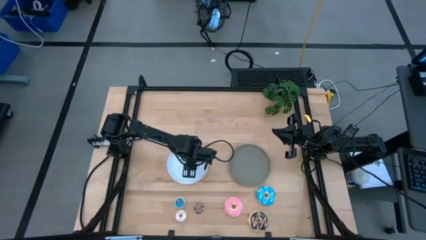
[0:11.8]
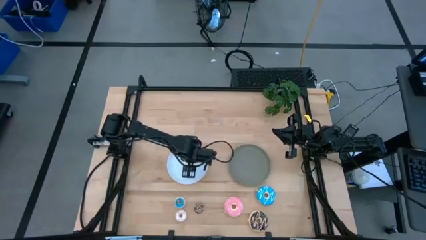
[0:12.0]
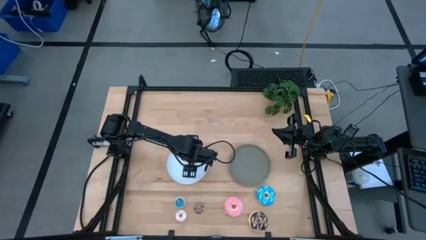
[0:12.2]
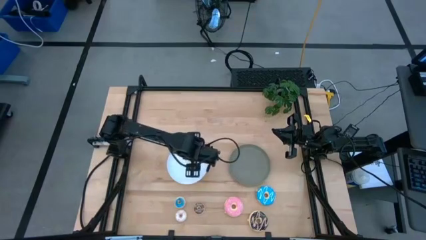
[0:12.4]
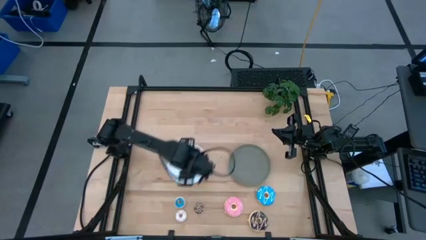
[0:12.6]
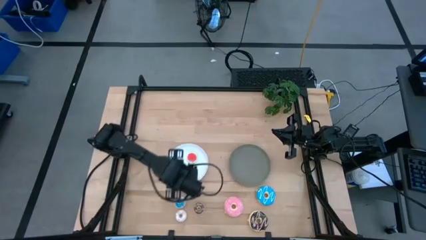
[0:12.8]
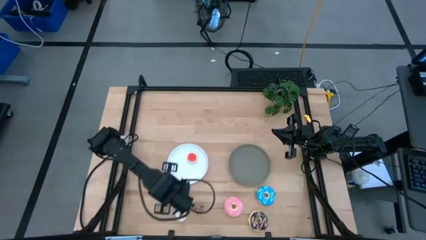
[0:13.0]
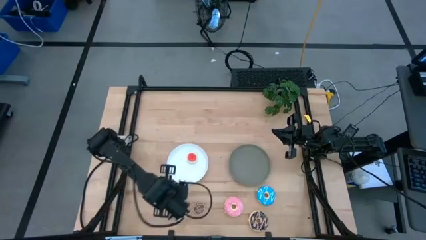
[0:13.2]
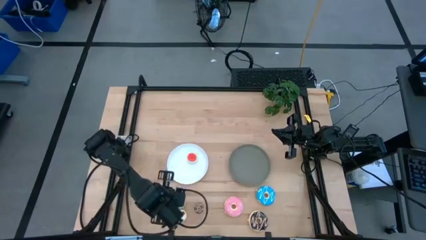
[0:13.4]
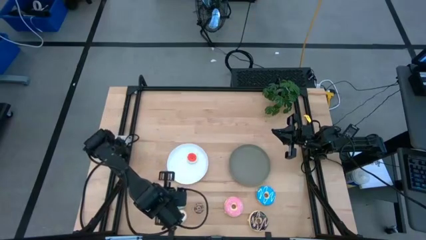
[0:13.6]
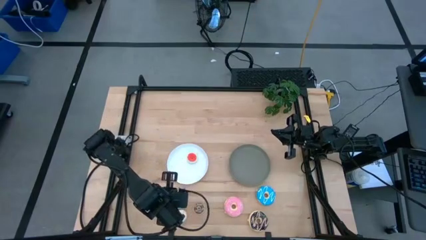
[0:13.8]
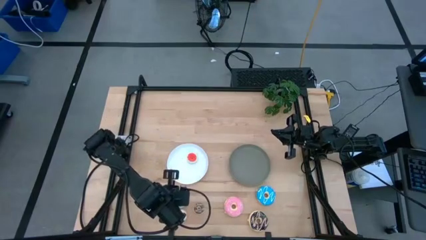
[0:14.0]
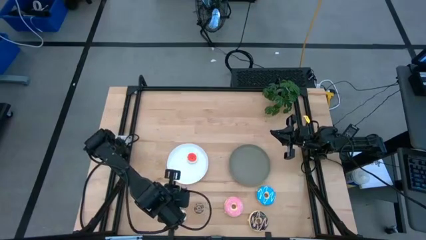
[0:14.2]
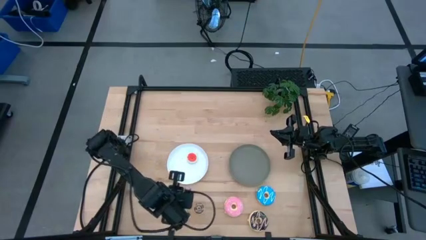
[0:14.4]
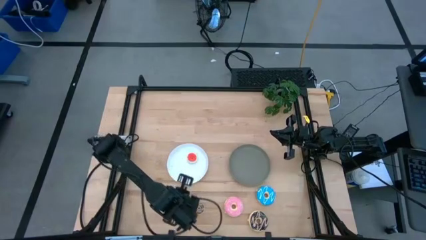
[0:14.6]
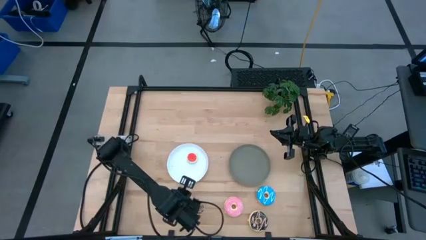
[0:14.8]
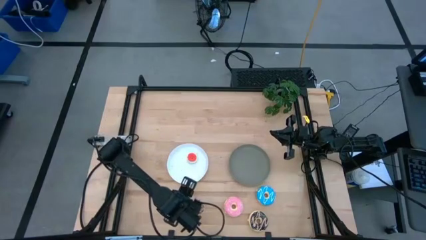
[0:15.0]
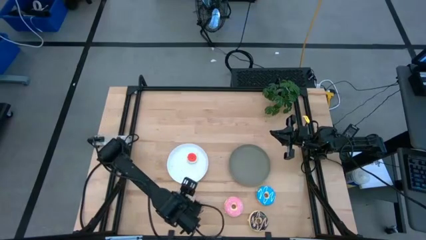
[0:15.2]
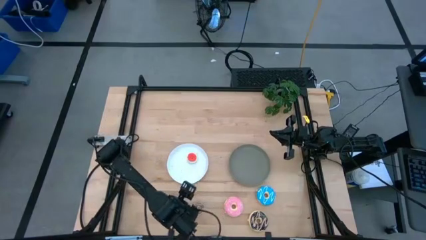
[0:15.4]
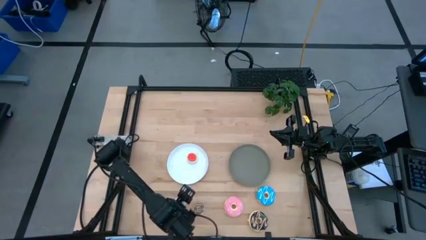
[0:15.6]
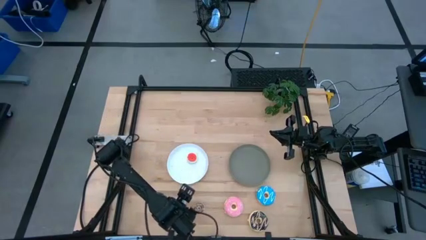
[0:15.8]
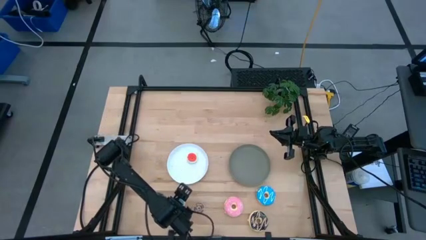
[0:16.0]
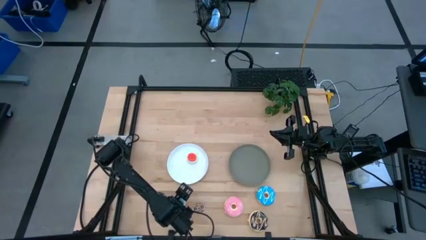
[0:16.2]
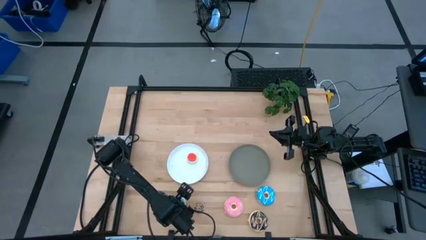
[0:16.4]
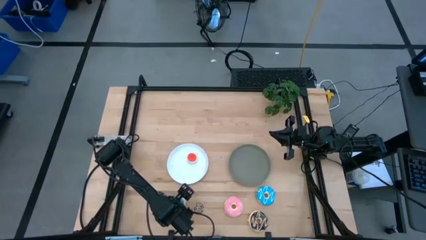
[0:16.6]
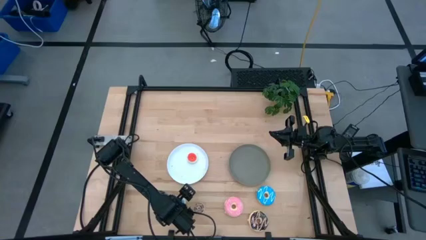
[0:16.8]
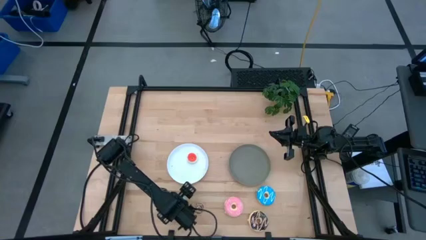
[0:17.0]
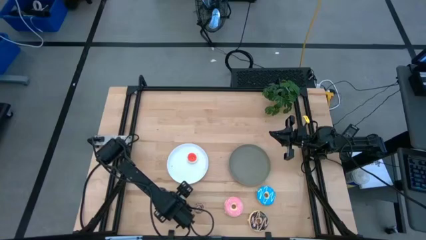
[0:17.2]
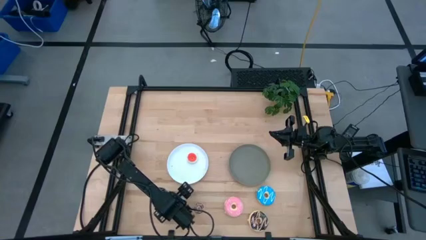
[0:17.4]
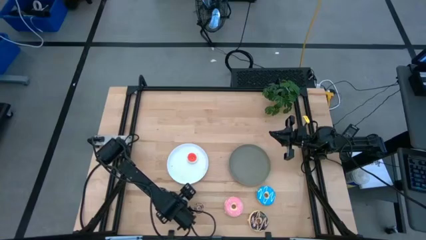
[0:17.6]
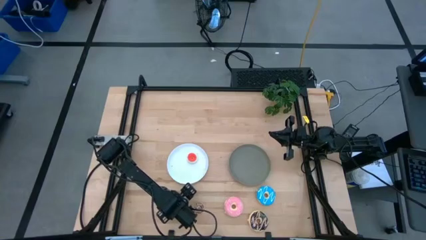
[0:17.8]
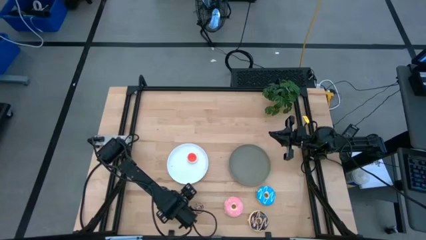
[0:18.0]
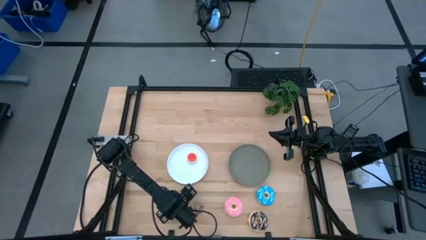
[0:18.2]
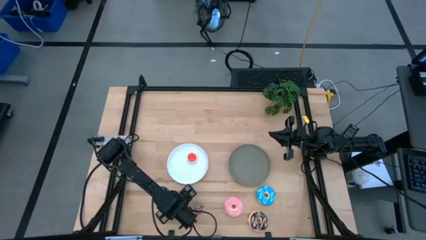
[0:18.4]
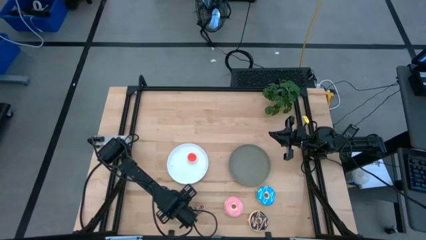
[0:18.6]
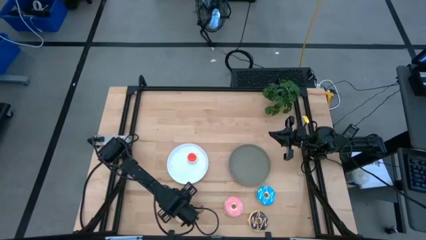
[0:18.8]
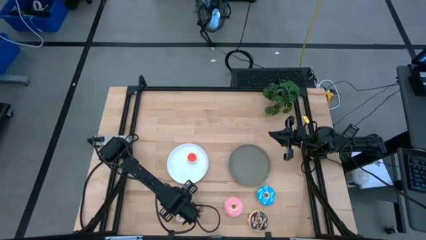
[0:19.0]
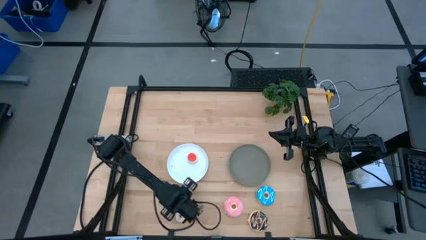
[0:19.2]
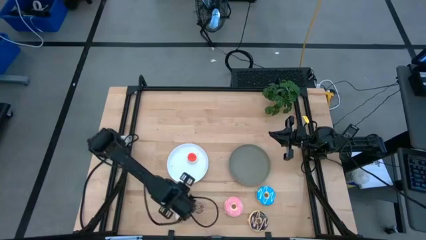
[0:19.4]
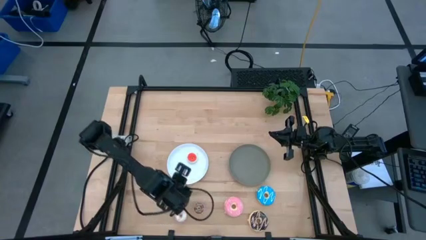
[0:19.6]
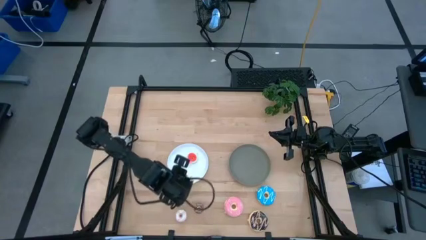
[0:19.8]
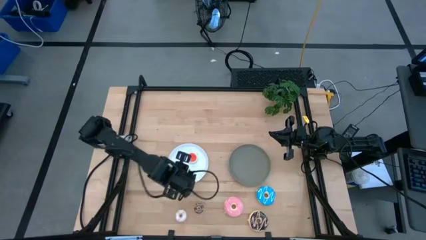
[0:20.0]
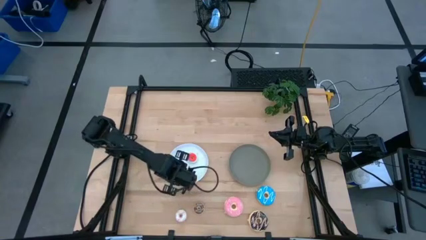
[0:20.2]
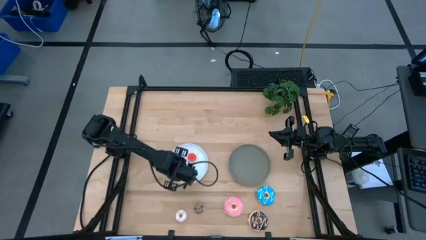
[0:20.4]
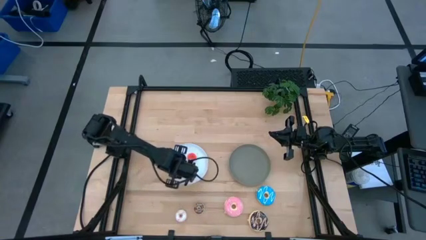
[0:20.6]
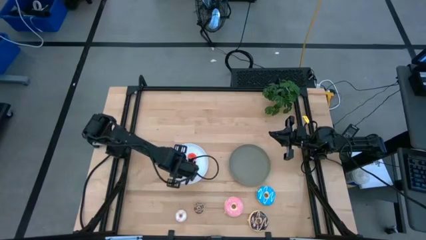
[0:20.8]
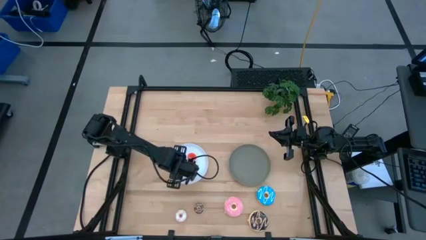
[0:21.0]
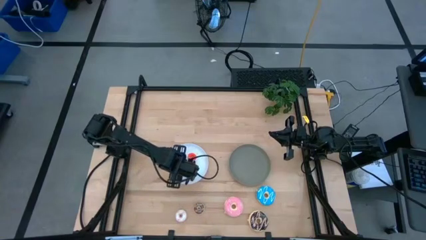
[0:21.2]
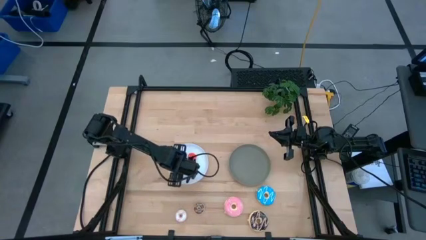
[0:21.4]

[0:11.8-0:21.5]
Task: Pick & Place donuts
Put the small blue donut on the white plate

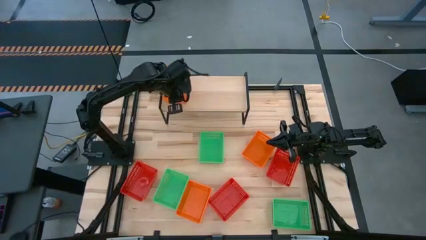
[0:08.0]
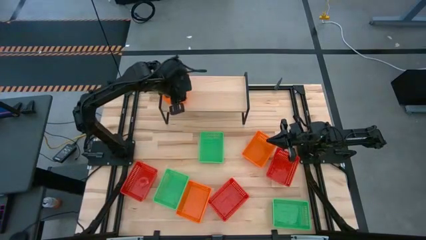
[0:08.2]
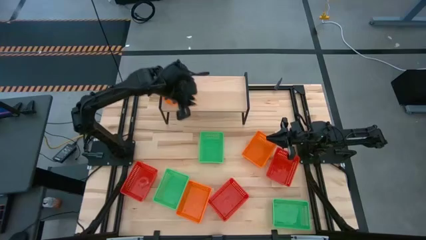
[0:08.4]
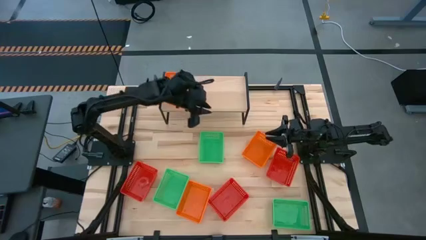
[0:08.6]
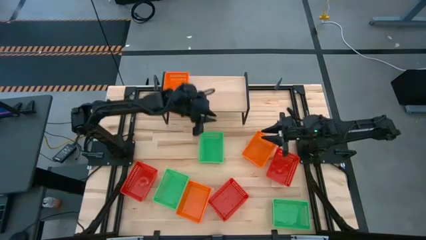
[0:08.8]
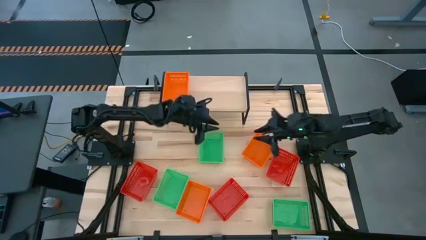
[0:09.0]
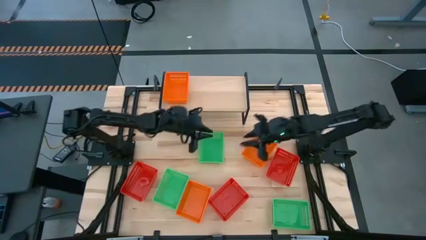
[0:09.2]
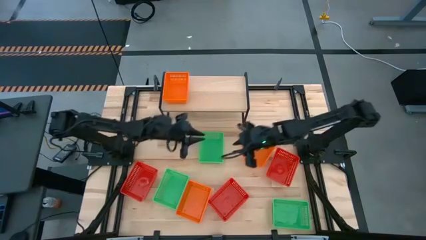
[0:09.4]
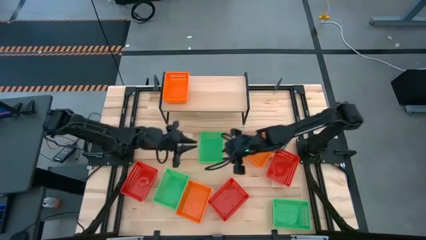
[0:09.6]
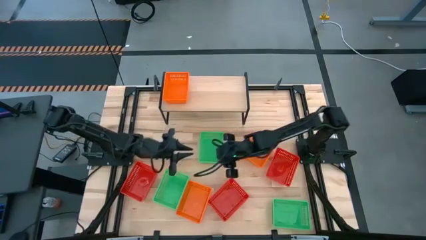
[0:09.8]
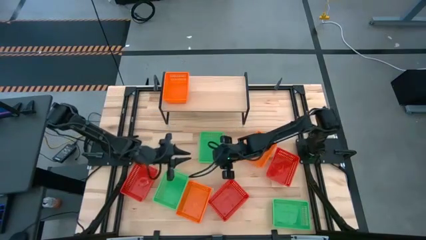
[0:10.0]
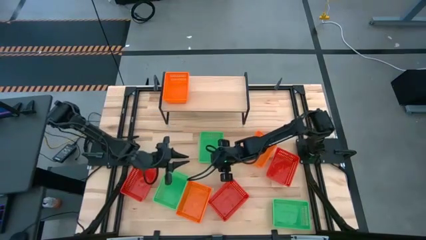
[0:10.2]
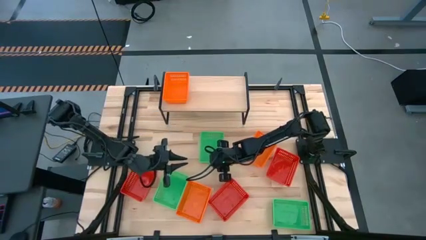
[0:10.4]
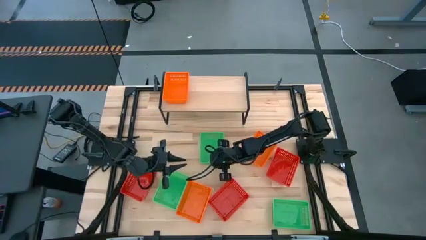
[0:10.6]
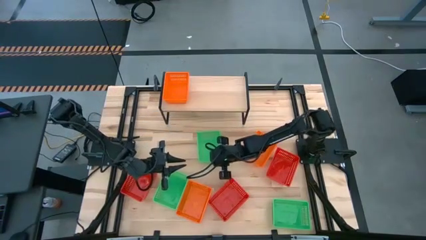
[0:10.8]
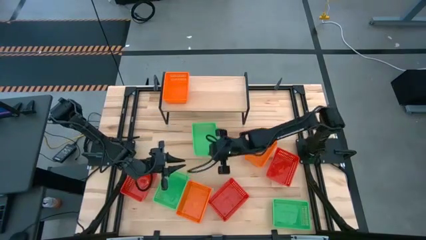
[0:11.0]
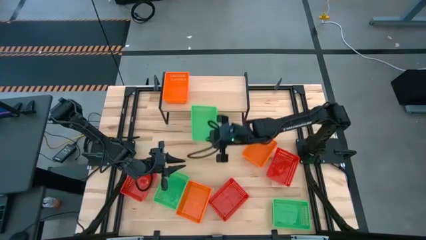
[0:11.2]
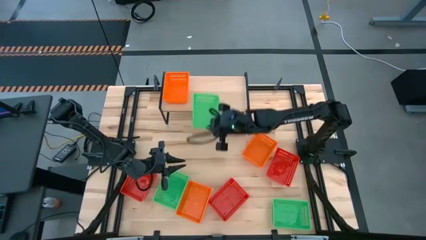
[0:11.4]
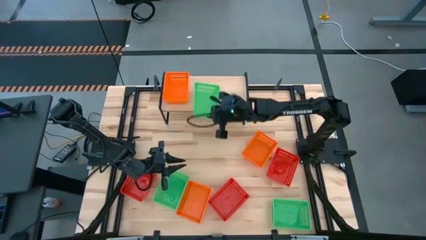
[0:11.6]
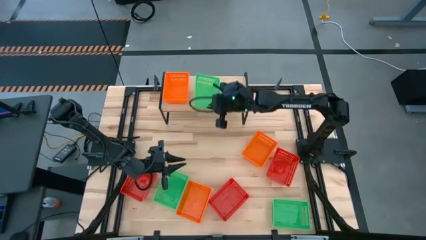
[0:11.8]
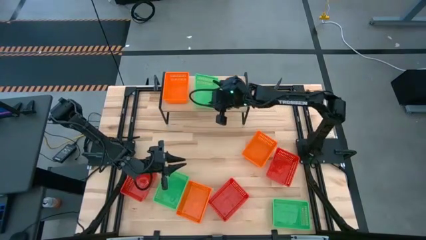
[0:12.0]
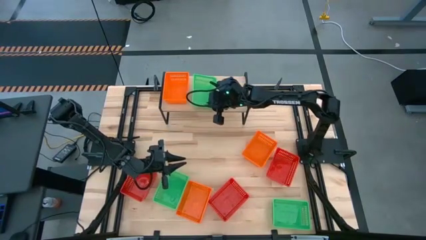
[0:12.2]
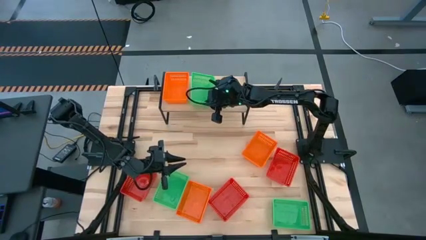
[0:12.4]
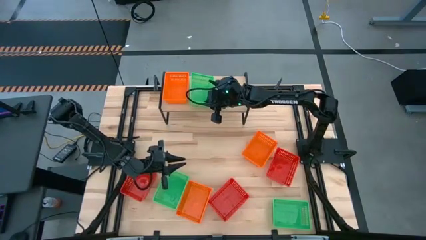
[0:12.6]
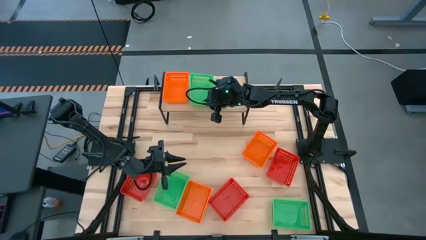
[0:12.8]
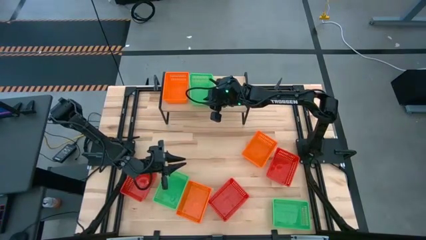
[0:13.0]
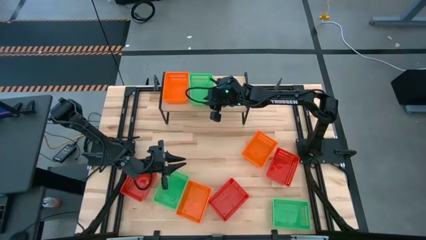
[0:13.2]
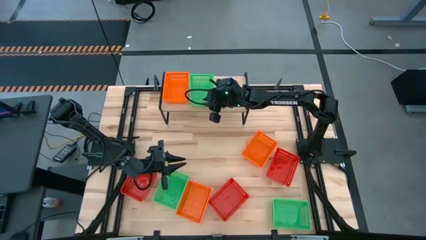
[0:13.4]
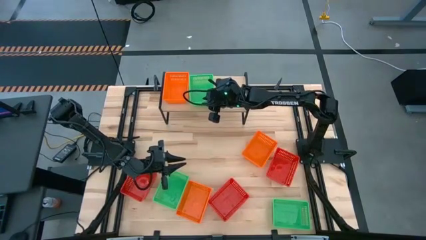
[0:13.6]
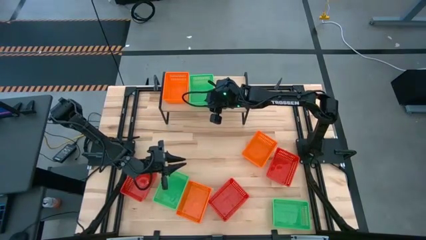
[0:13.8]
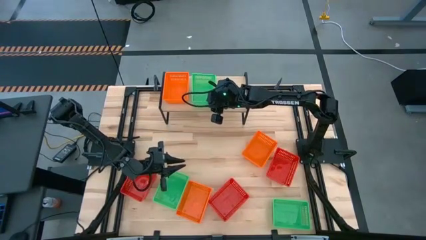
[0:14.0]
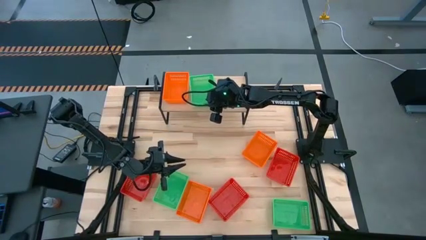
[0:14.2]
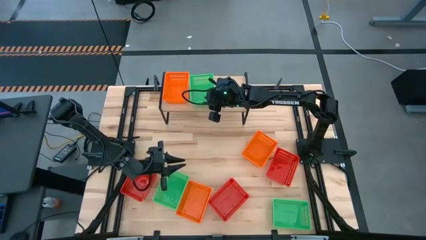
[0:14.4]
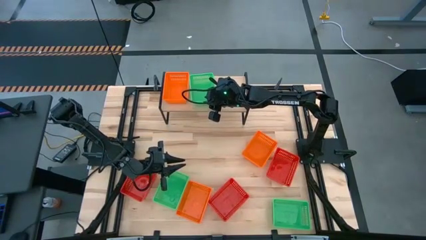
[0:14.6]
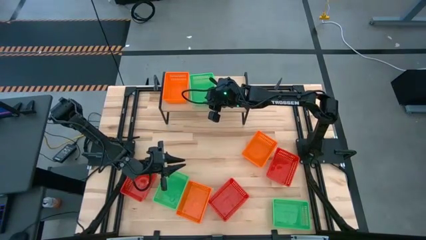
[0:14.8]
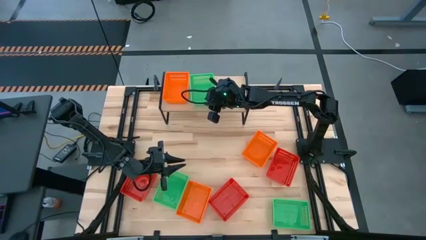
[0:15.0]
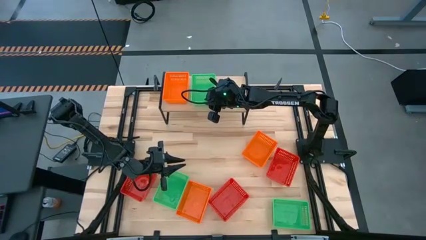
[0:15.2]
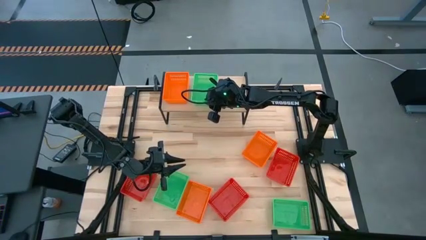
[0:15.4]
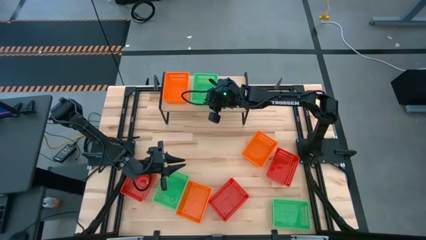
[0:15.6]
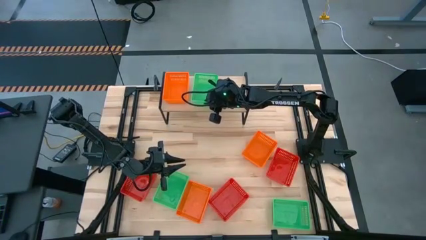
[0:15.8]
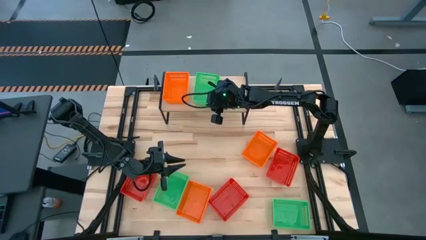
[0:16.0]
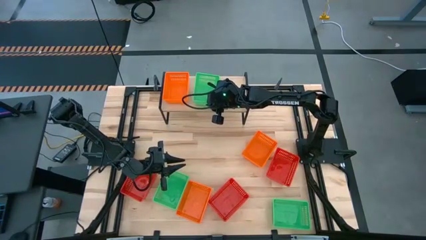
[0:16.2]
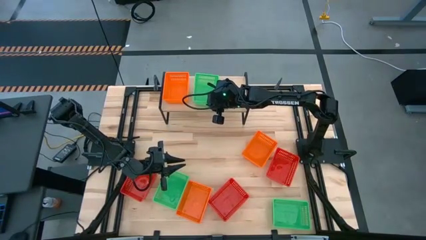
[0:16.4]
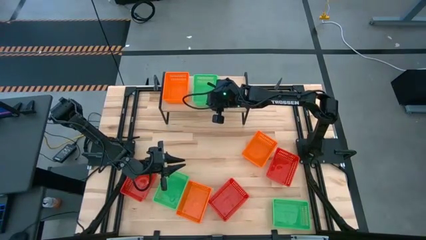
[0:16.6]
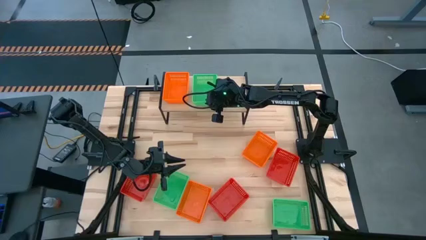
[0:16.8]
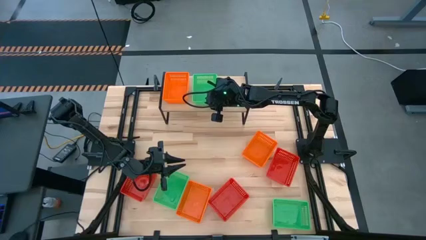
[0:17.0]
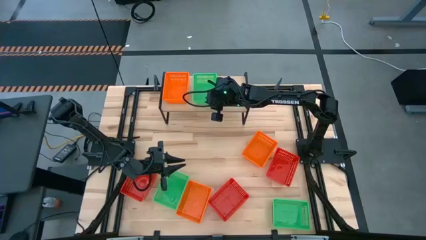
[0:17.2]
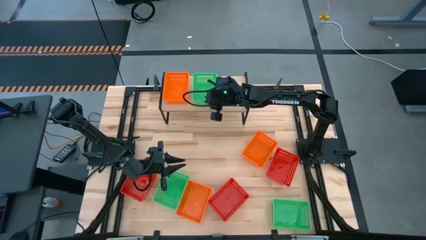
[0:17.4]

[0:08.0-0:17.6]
Task: Stack baskets on shelf by color
Put the top green bin on the shelf
